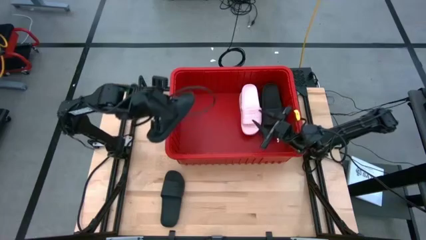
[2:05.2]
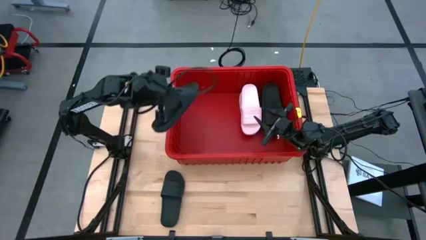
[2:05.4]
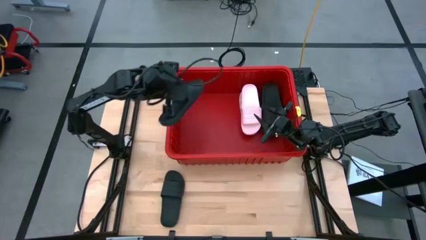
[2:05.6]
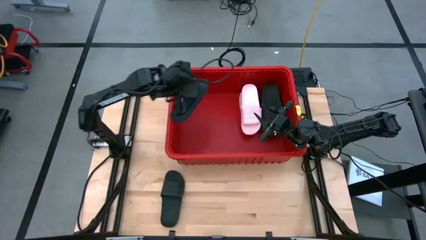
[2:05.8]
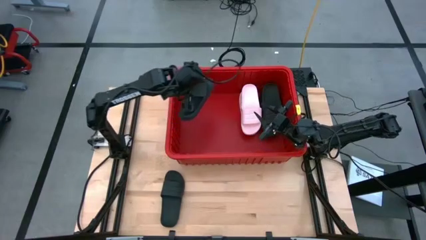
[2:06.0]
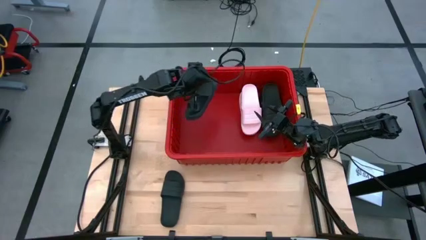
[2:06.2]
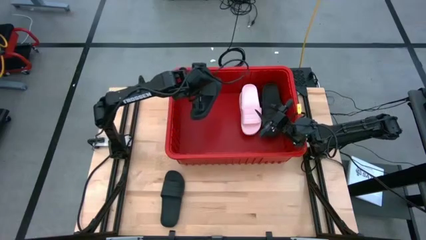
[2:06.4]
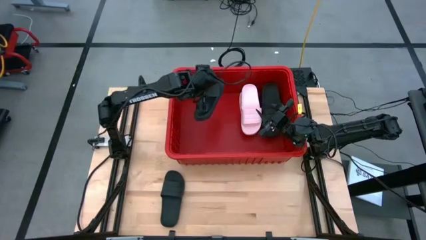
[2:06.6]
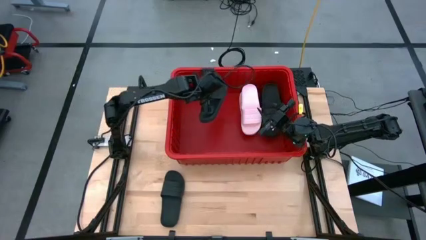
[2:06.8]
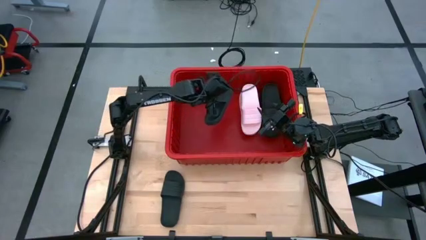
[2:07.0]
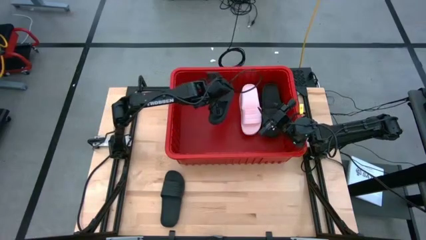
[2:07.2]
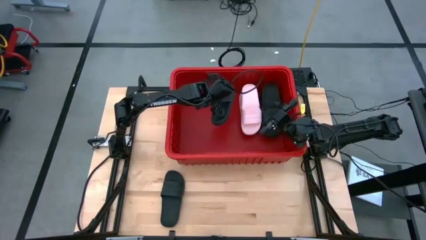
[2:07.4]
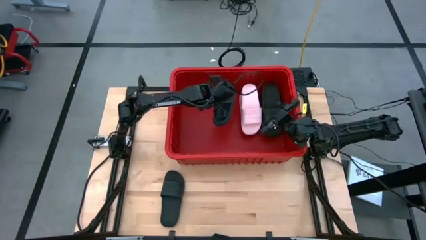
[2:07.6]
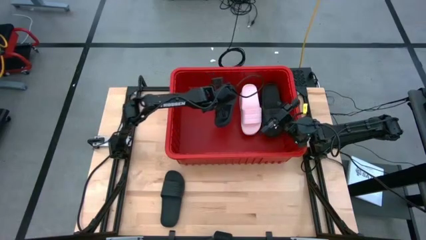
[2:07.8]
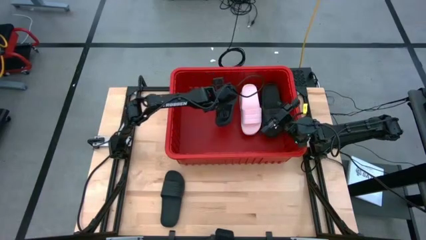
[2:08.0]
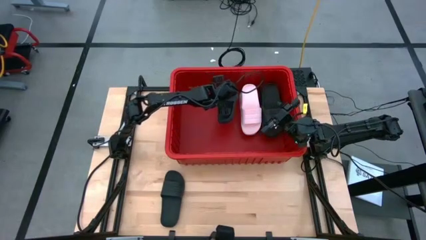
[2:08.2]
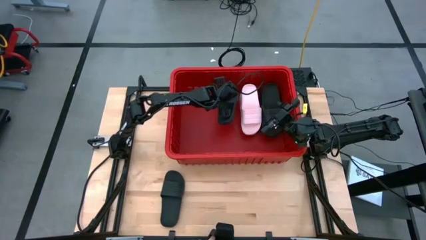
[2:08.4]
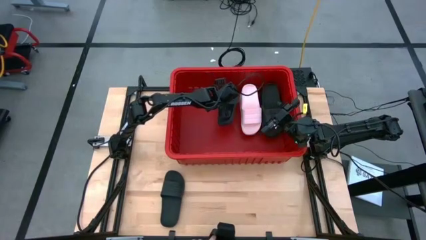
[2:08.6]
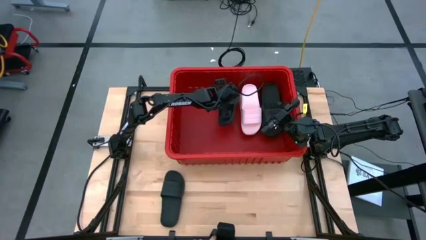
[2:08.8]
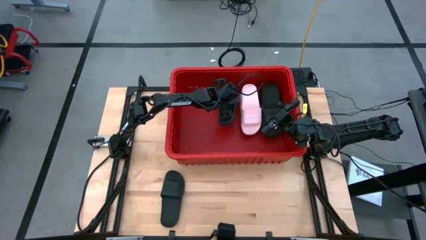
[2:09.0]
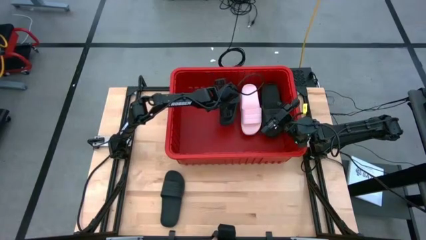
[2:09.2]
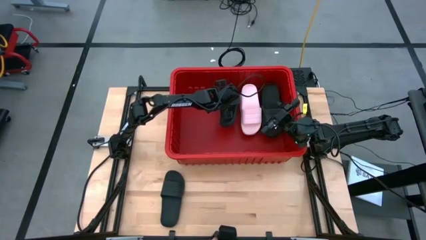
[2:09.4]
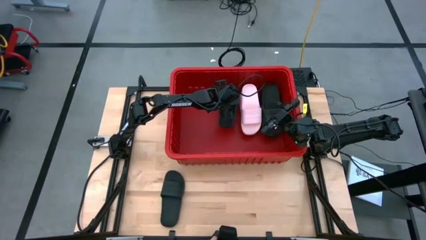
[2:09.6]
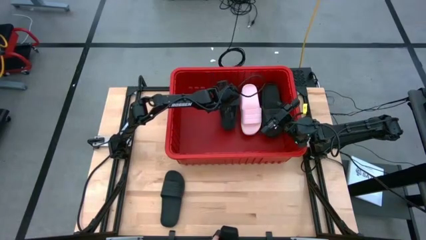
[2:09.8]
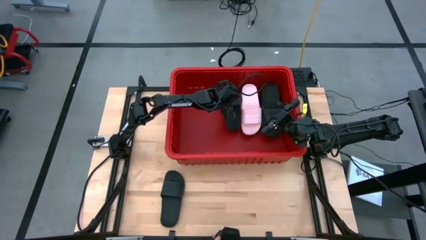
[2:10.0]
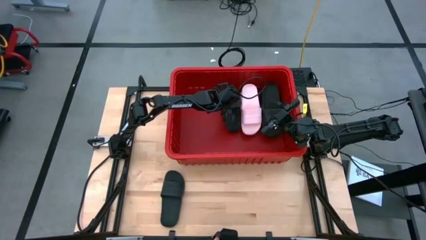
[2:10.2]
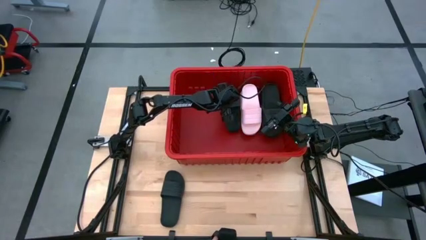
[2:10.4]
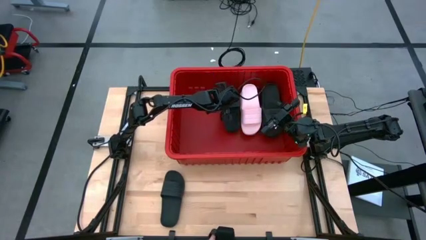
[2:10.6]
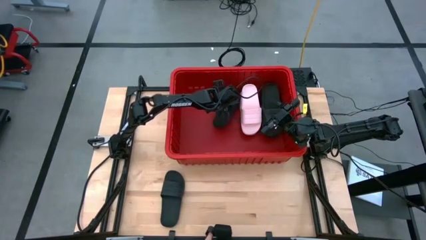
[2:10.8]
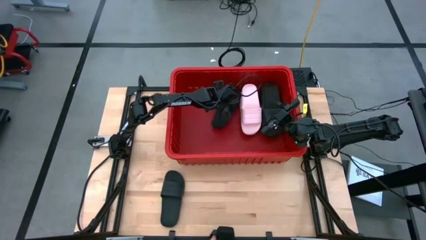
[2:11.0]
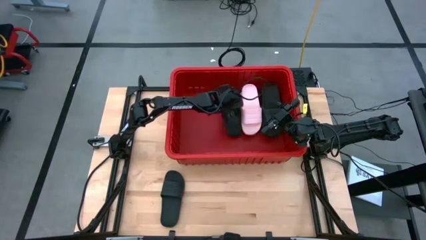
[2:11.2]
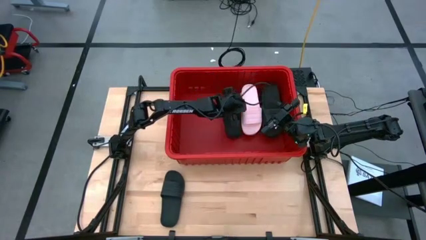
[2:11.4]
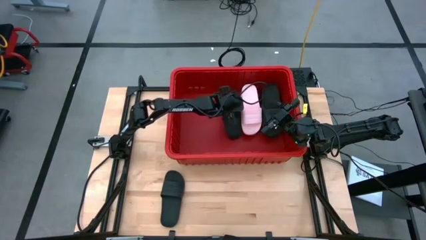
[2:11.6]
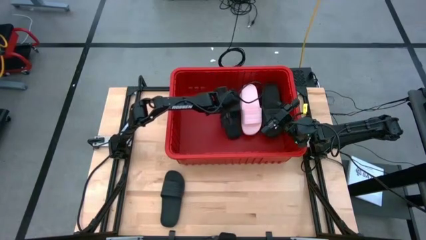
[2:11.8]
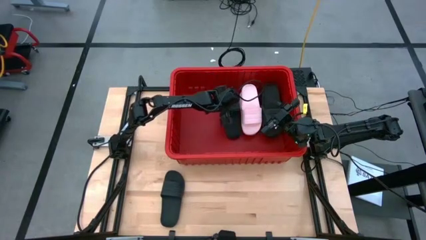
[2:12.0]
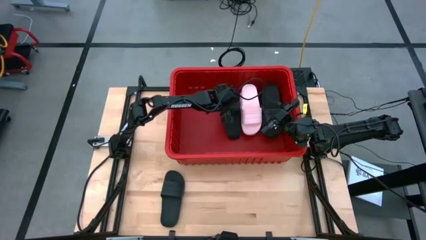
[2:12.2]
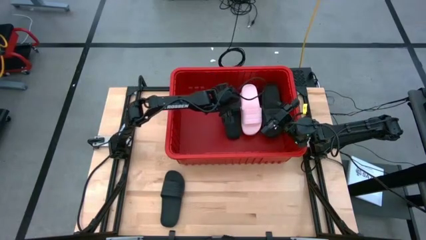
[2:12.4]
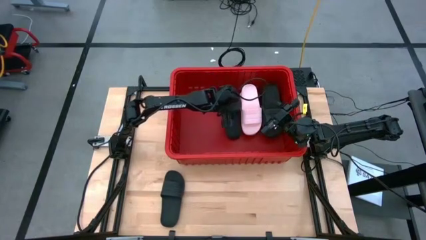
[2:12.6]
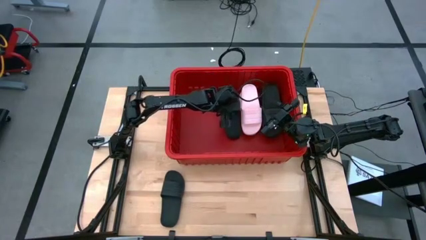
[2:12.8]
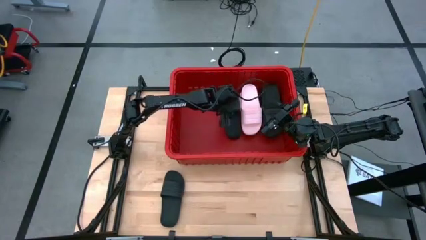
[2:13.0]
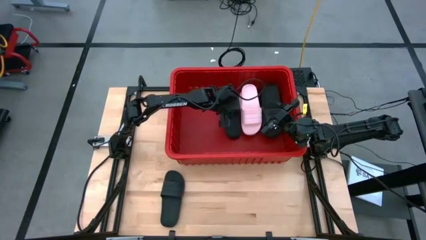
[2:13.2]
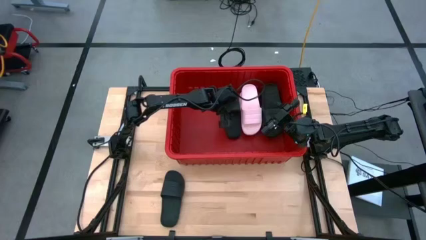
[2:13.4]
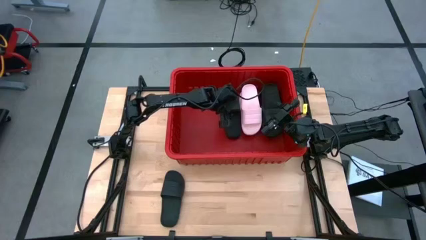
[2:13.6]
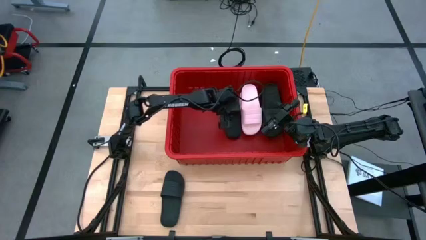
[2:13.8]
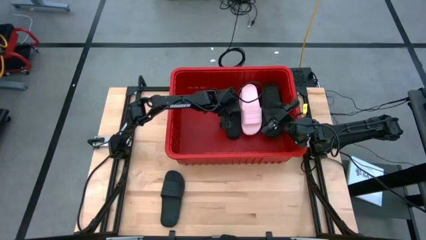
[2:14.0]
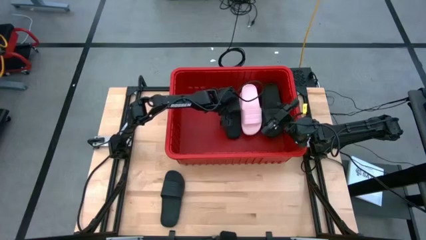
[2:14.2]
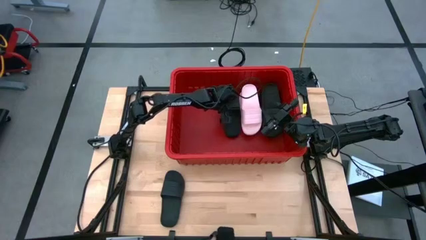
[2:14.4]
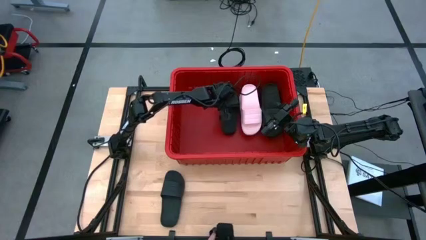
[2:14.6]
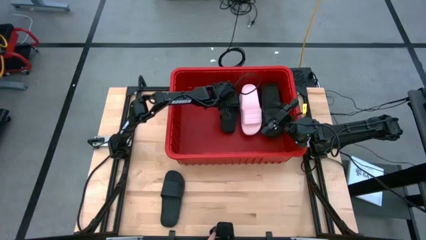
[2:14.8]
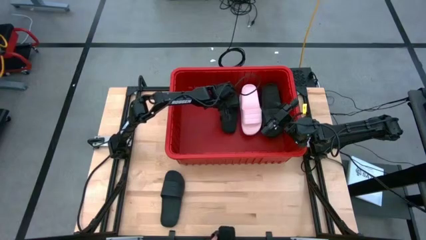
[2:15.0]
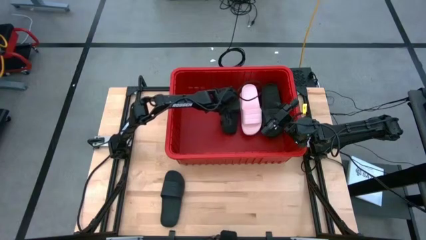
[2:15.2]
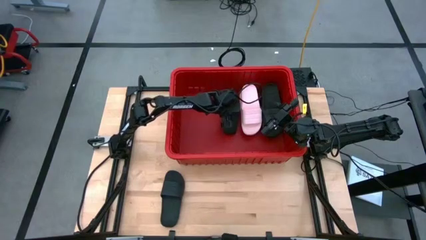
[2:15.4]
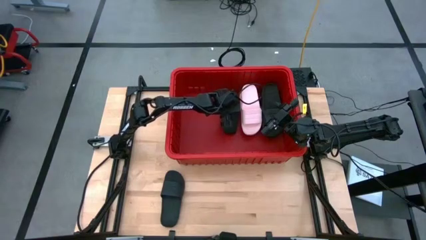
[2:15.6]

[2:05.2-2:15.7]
Task: Pick and place slides into bin
Put the black slide into the red organizer bin
